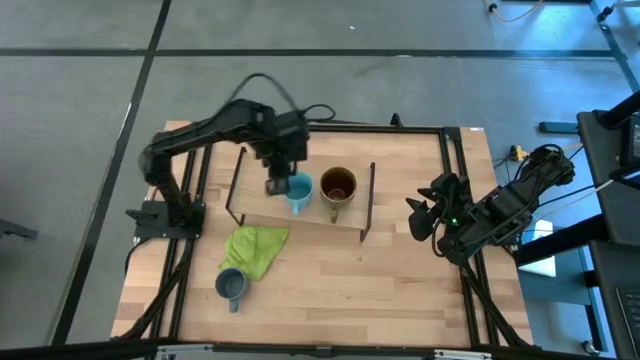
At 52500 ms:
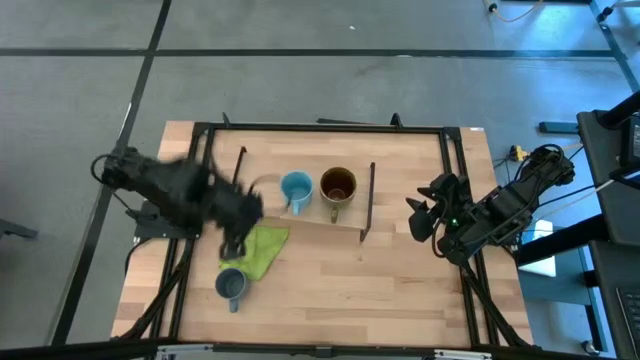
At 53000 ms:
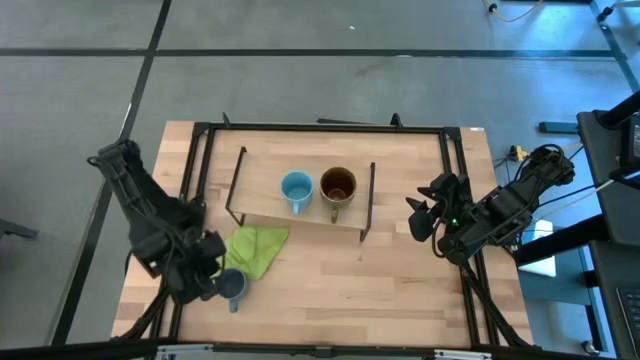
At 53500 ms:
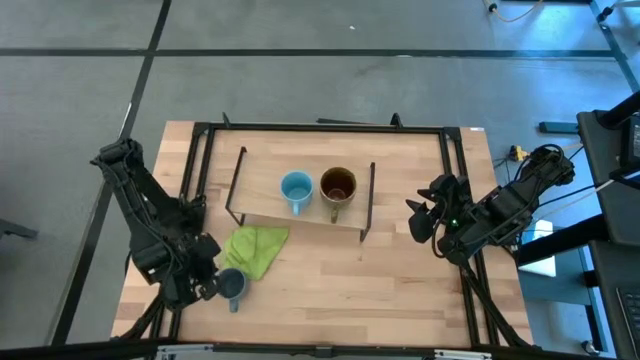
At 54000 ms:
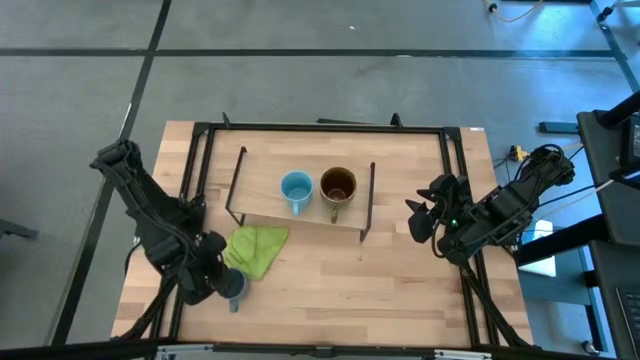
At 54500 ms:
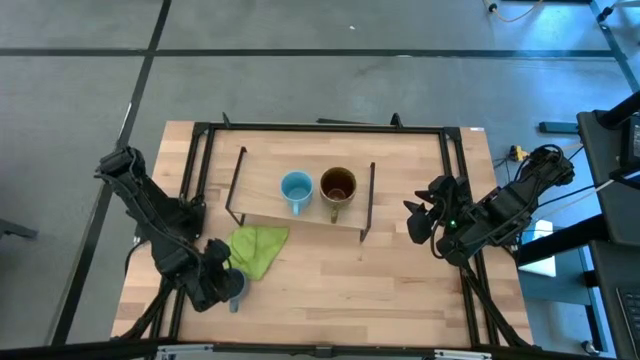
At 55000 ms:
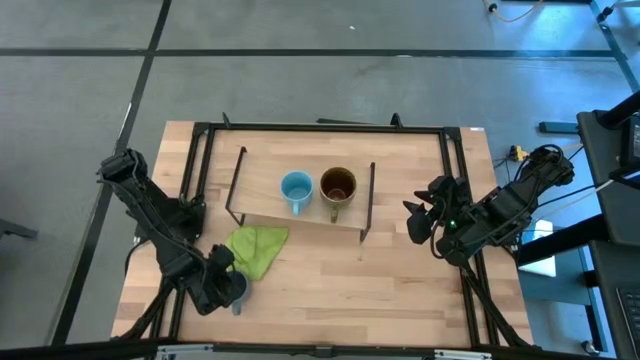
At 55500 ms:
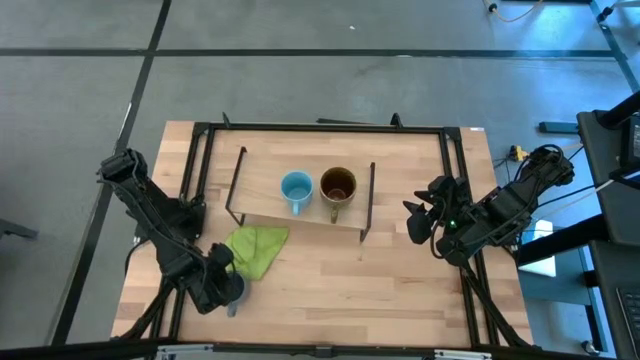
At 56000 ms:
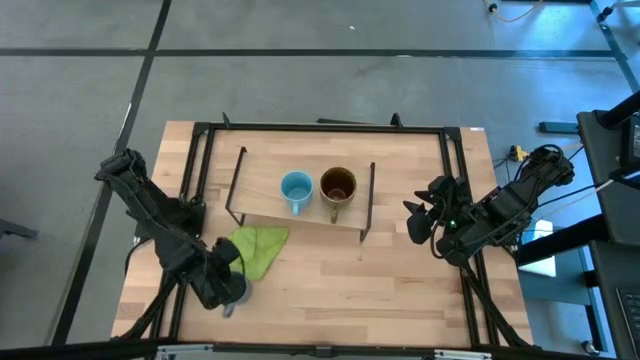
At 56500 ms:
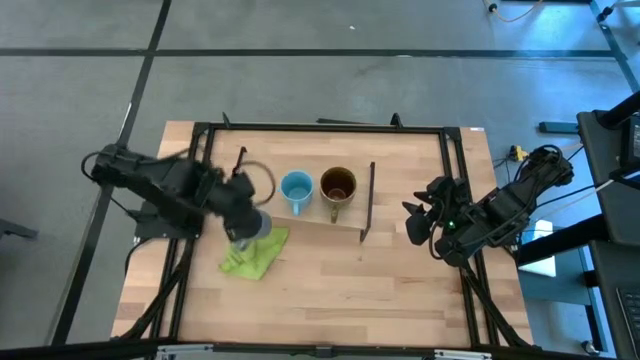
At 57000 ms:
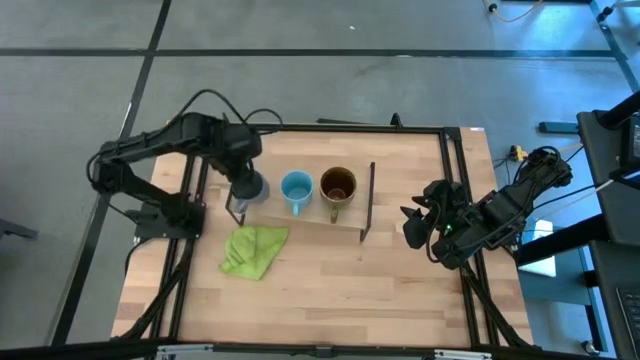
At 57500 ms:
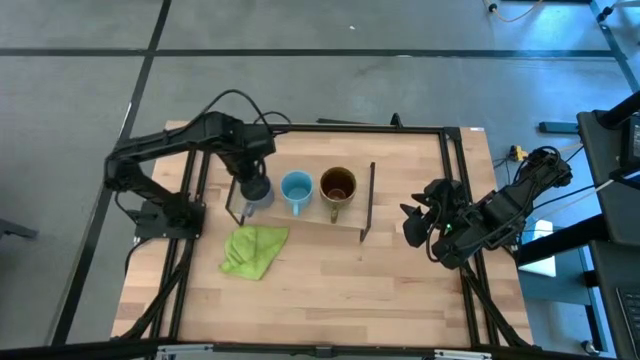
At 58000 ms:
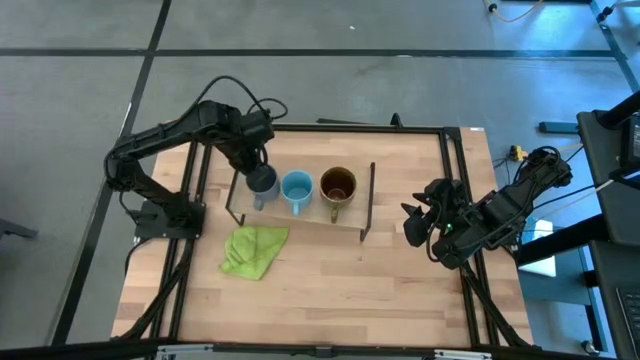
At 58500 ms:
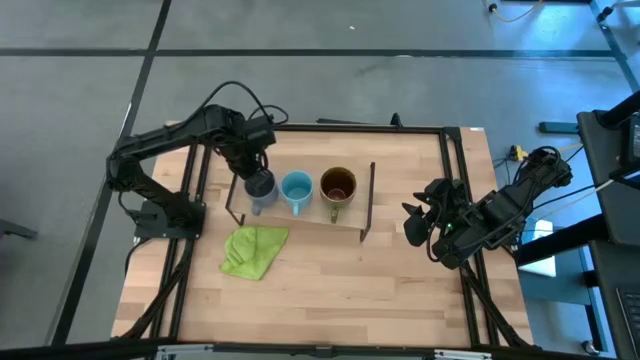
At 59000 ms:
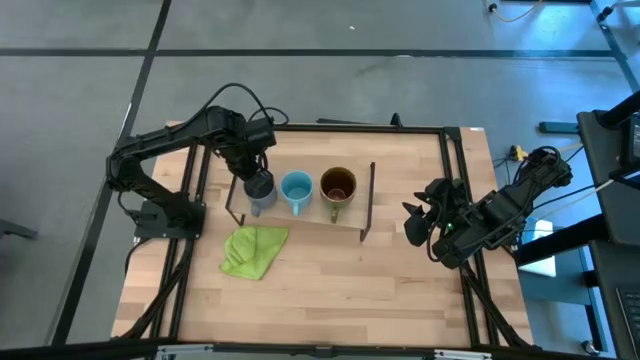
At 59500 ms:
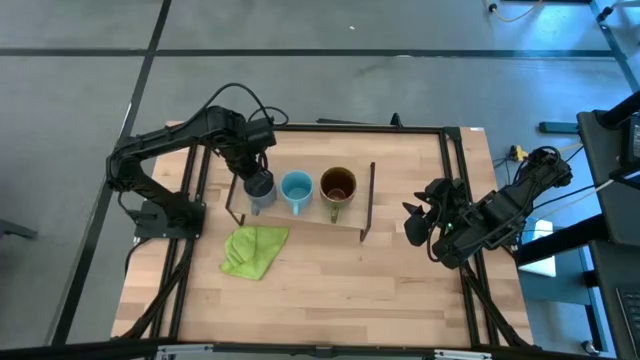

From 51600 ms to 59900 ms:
Task: Stack small to large cups/mugs on shelf
Put the dark blue mug on the shelf

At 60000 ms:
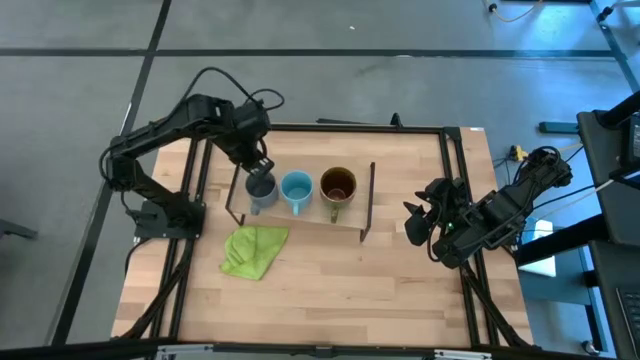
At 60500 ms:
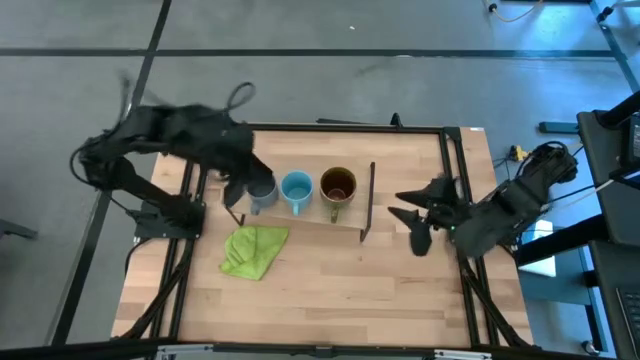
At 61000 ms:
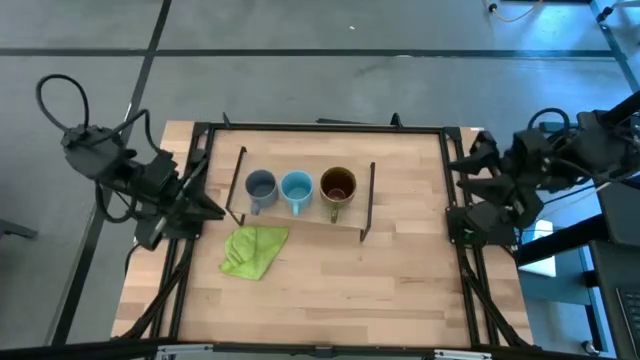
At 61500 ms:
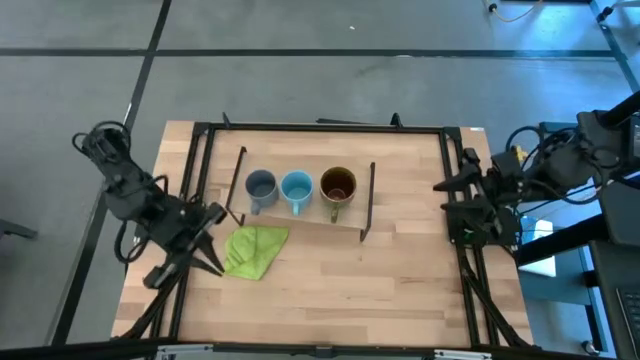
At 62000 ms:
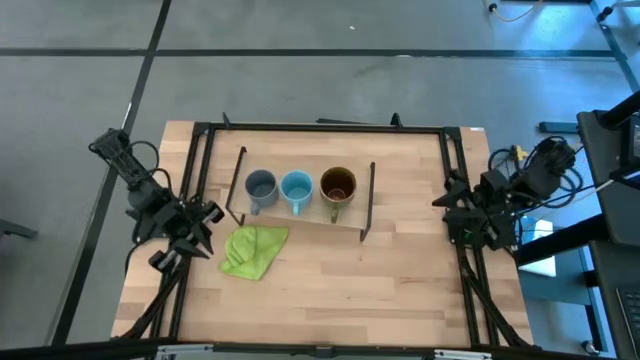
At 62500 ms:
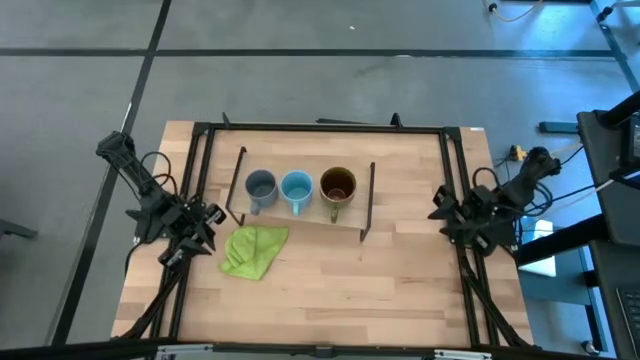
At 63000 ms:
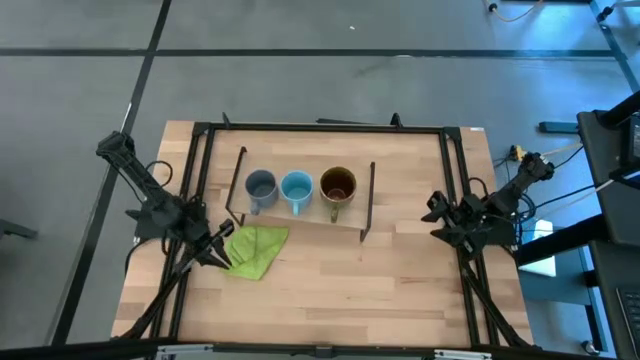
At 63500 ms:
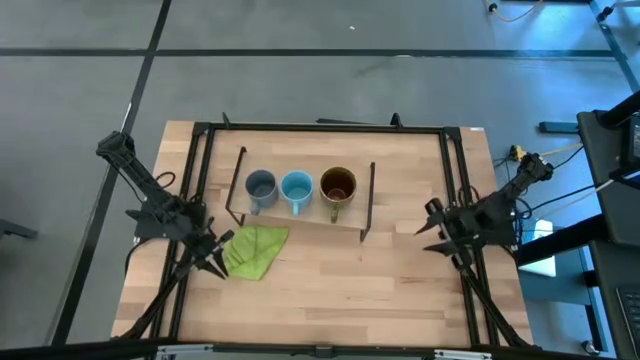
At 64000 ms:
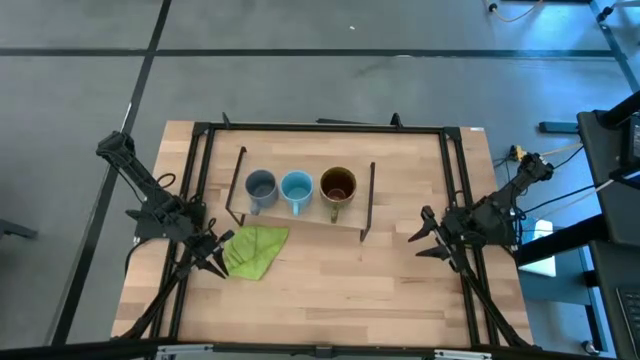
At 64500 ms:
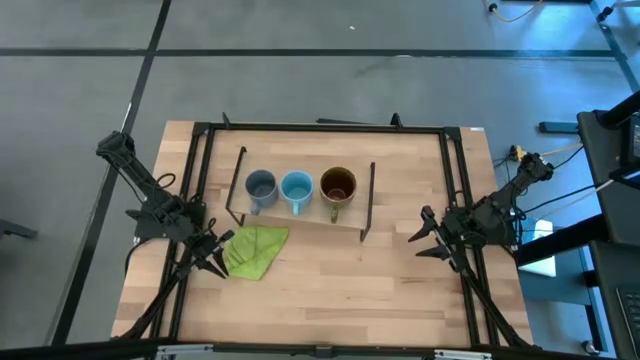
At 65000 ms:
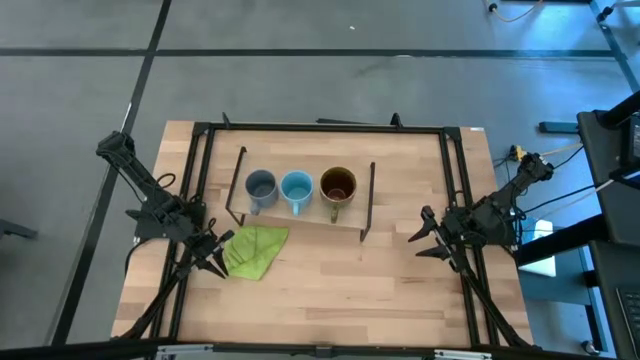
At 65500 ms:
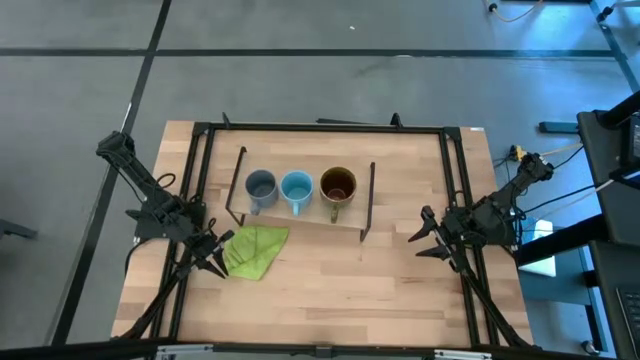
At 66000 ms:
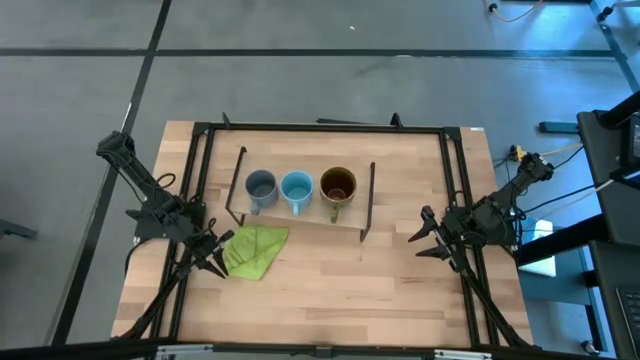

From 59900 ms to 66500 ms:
Return to Home Position

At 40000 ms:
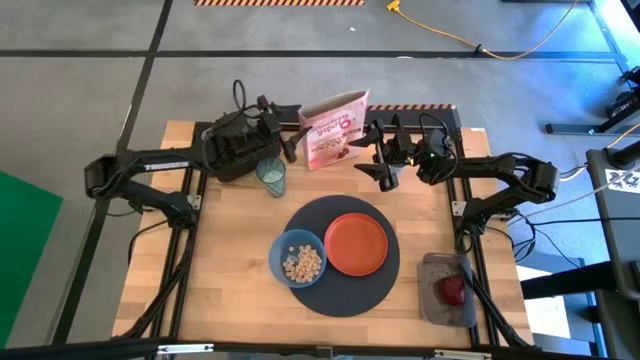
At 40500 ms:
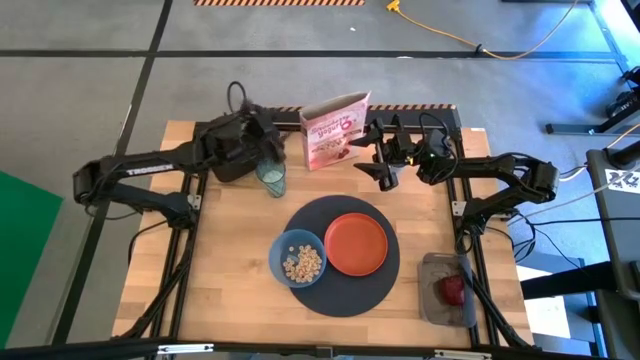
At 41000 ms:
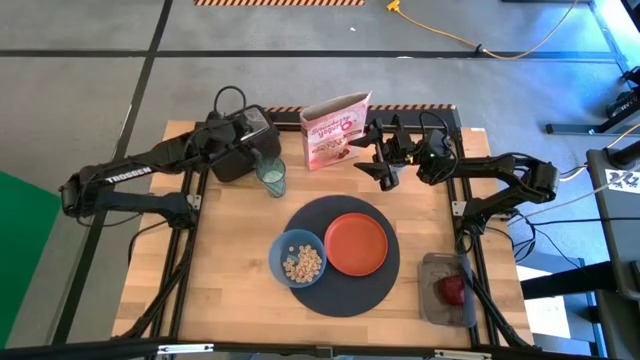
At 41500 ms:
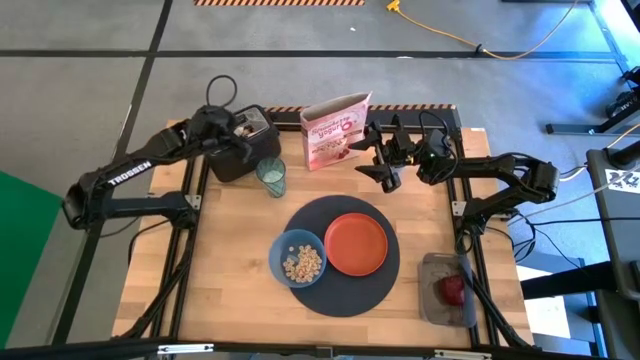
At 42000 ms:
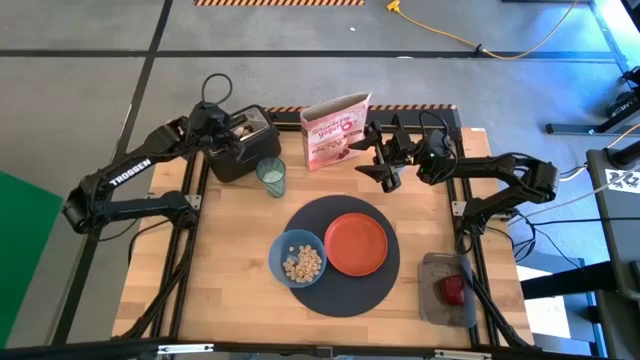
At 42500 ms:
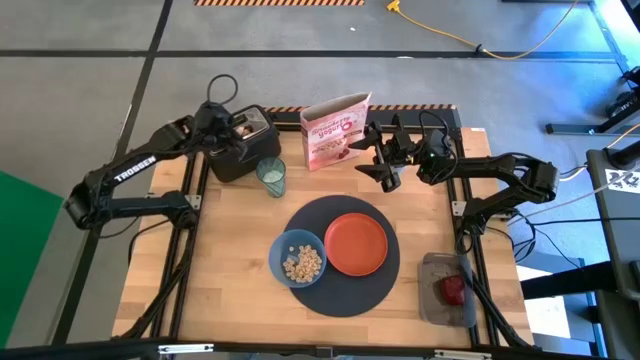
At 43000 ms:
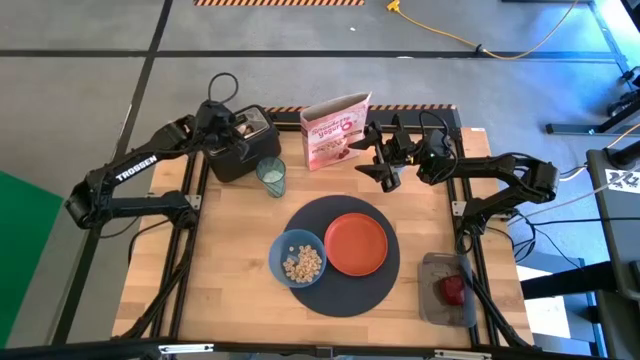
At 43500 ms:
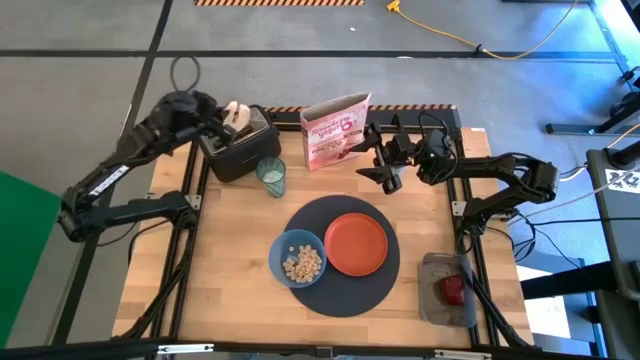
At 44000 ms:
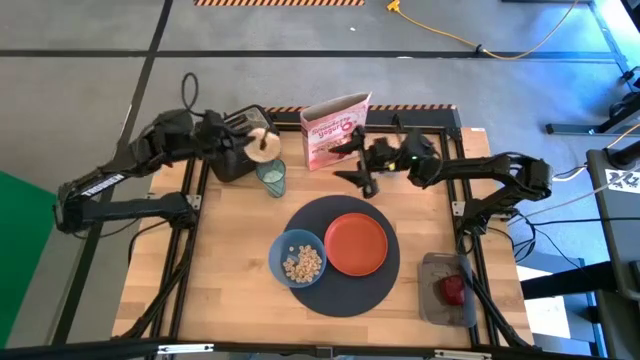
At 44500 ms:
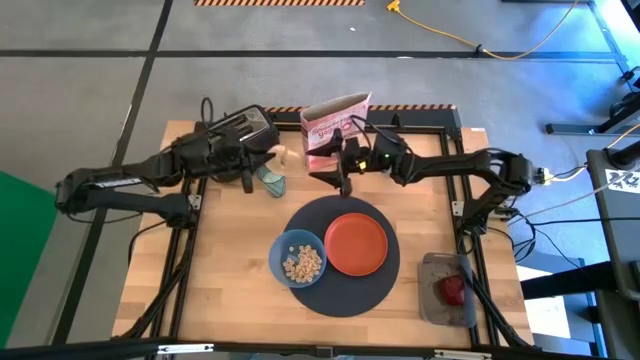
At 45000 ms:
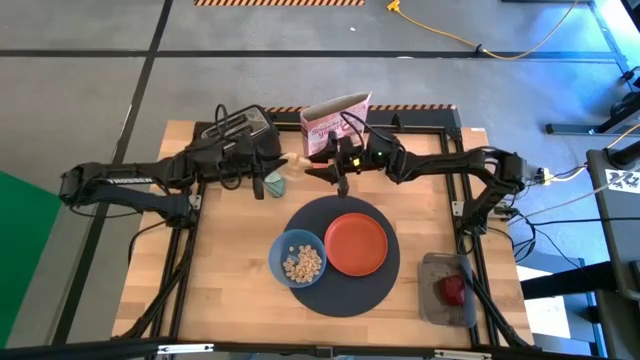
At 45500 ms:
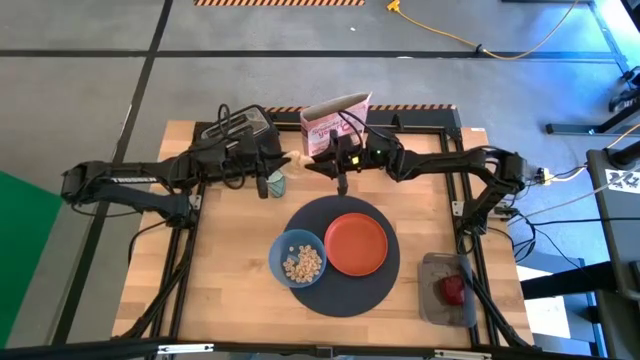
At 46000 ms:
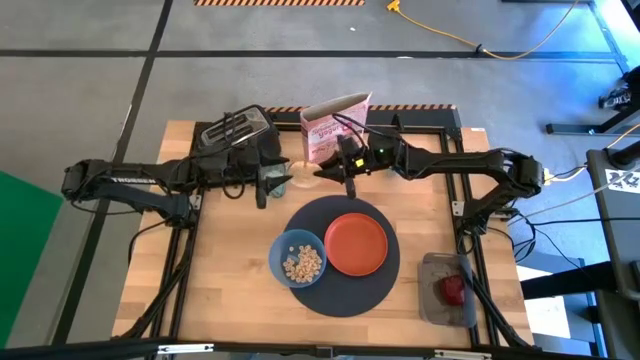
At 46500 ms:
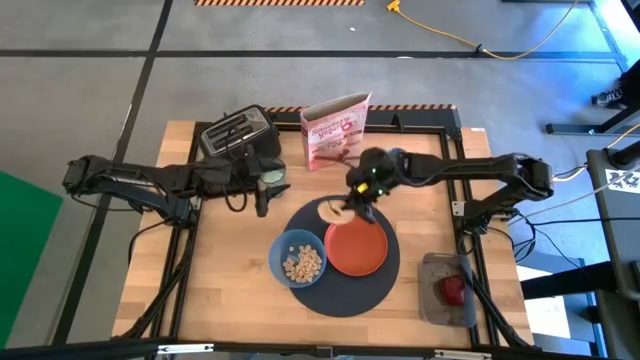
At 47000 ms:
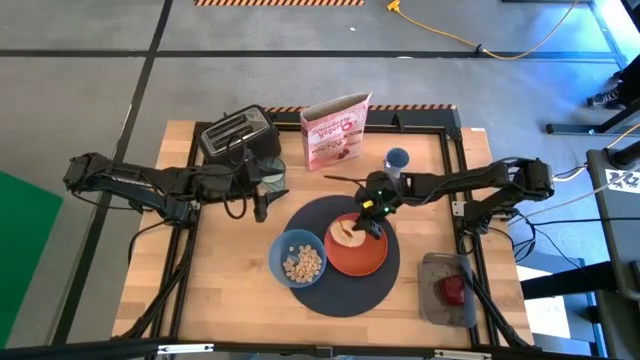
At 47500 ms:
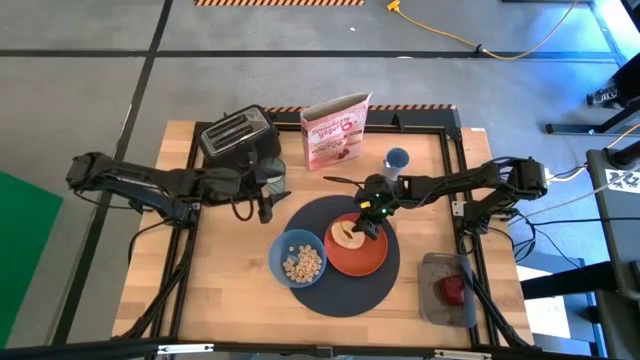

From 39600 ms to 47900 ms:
Task: Arrange a breakfast setting
Put the bagel on the plate
